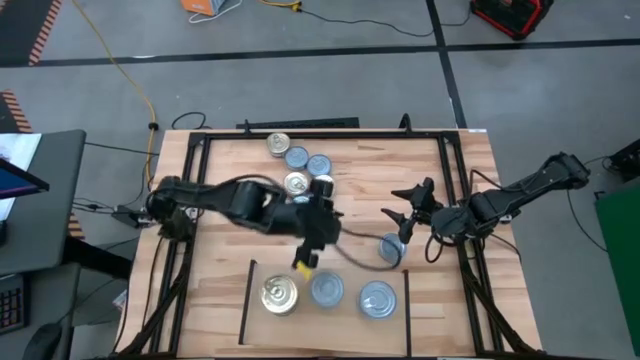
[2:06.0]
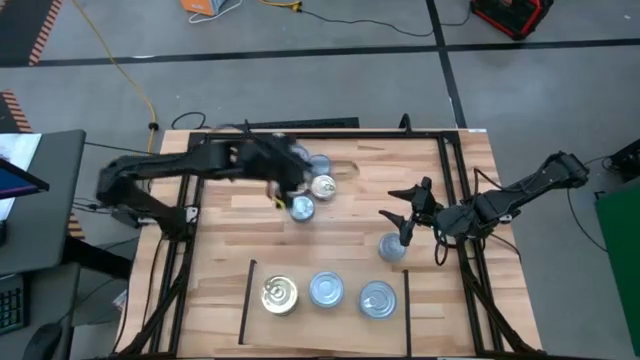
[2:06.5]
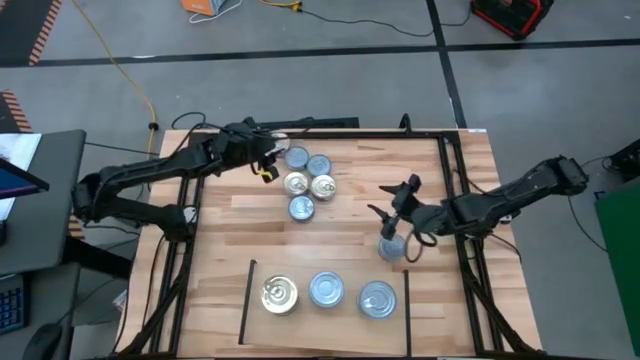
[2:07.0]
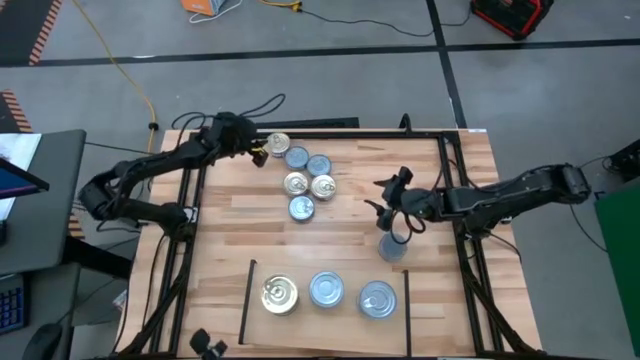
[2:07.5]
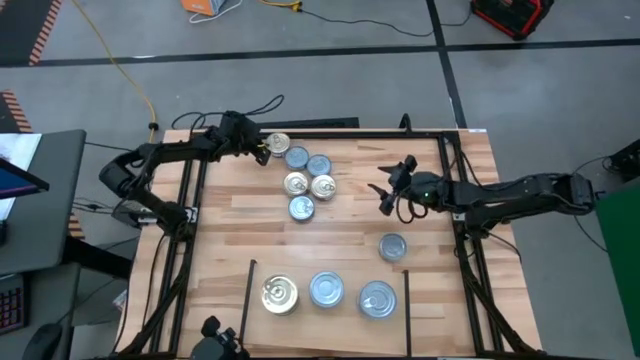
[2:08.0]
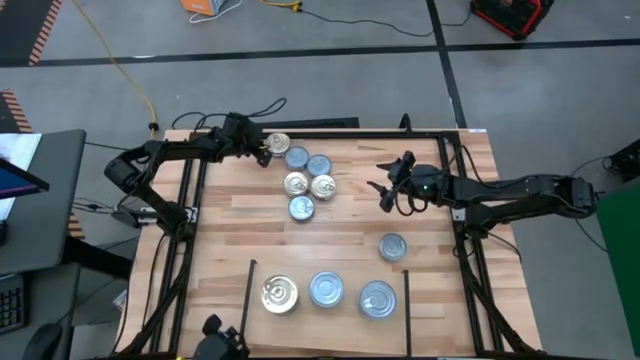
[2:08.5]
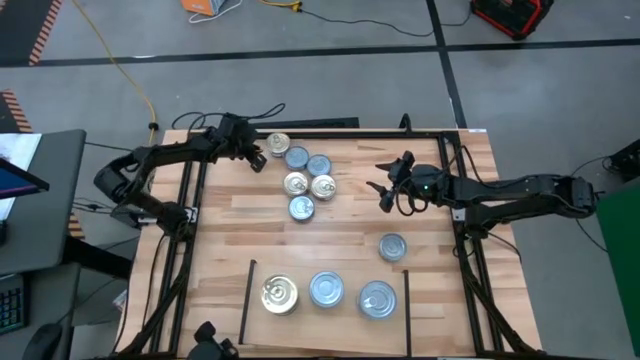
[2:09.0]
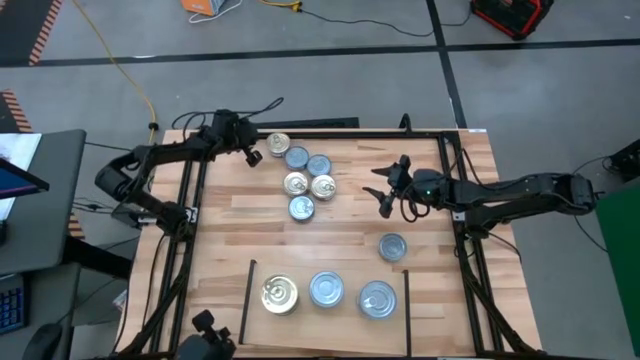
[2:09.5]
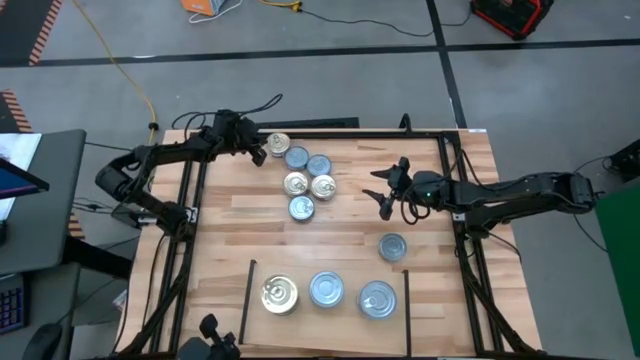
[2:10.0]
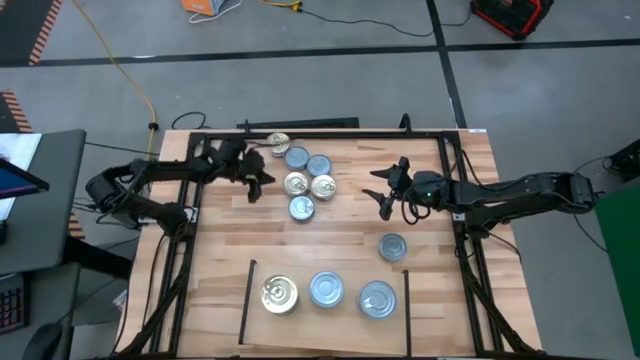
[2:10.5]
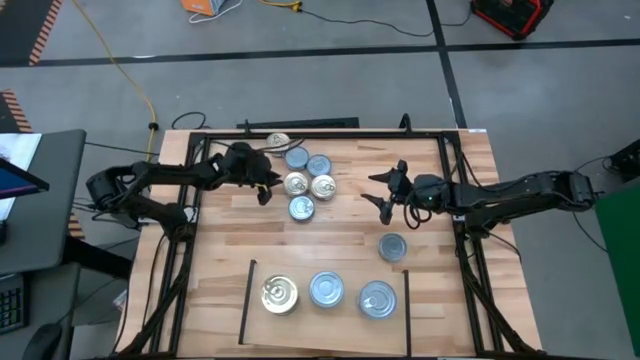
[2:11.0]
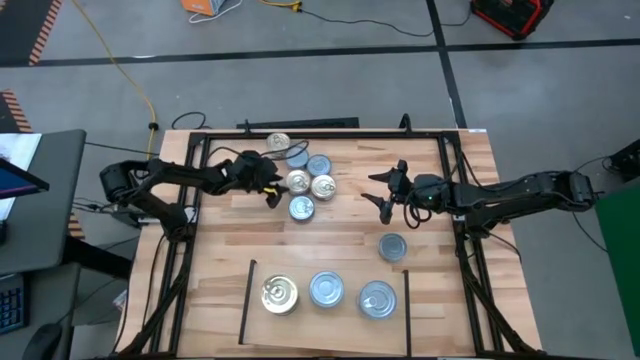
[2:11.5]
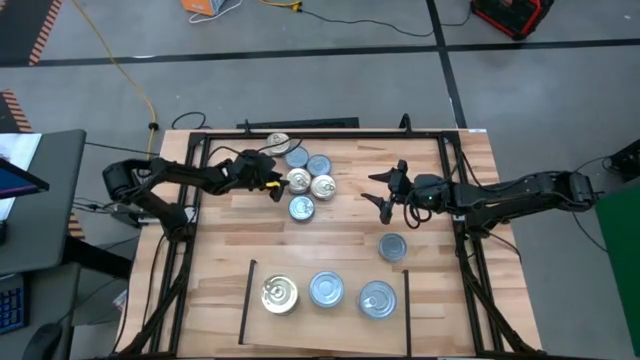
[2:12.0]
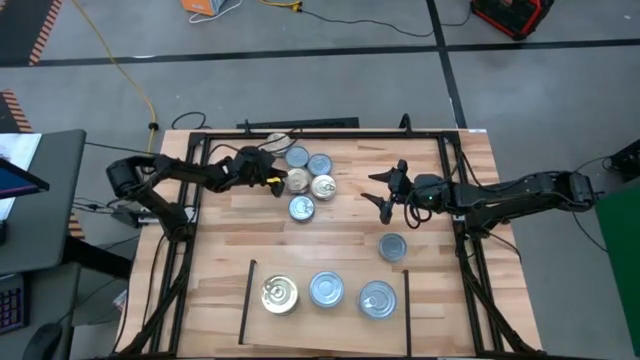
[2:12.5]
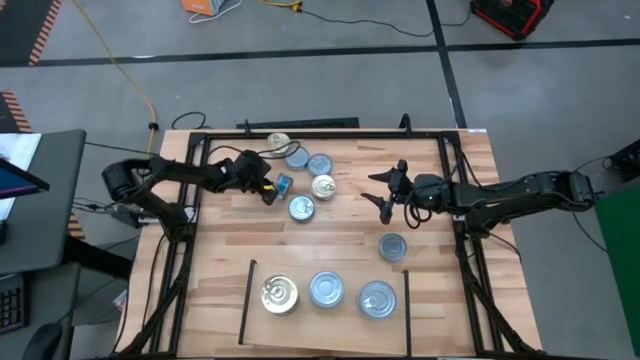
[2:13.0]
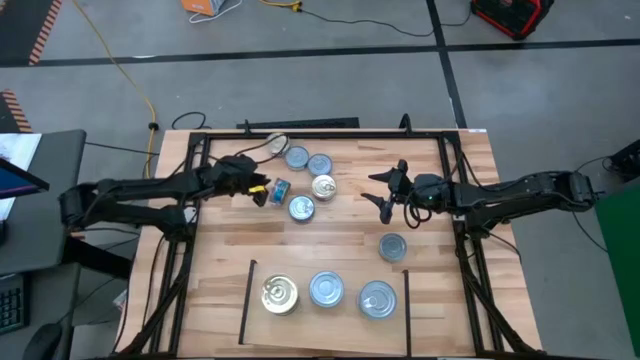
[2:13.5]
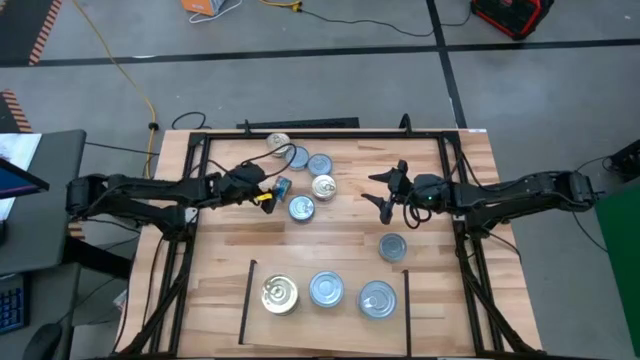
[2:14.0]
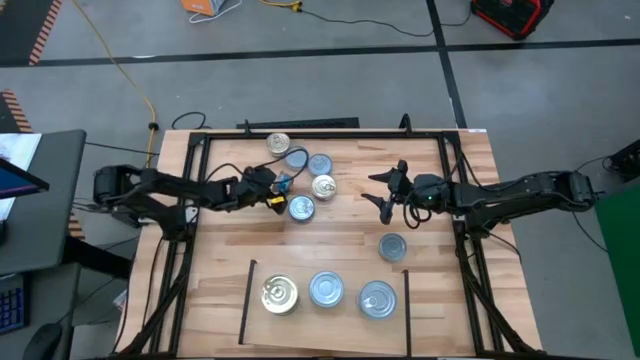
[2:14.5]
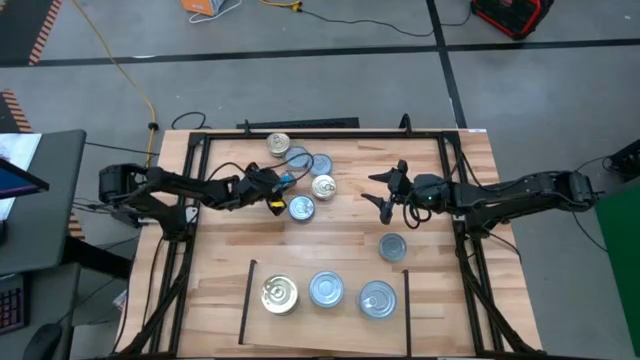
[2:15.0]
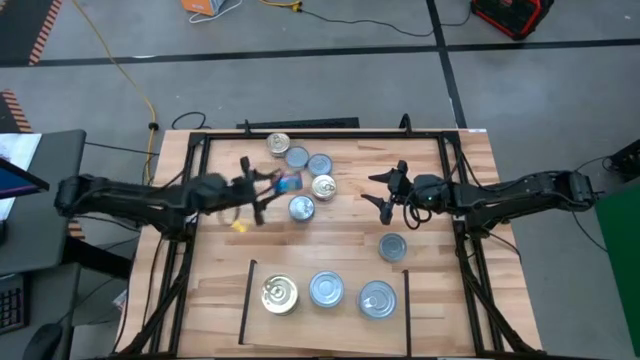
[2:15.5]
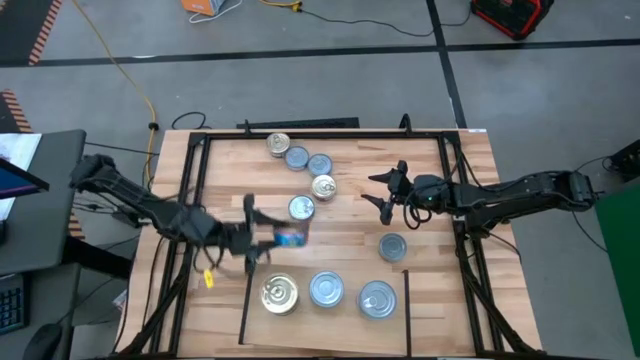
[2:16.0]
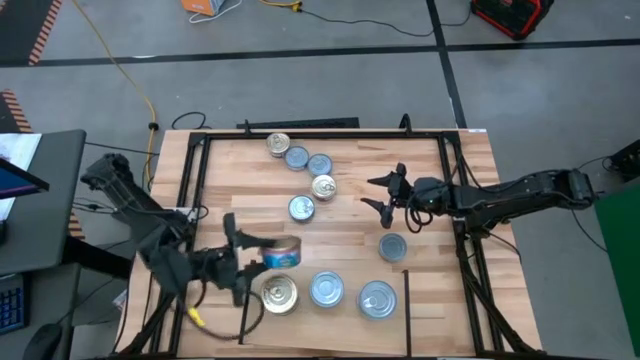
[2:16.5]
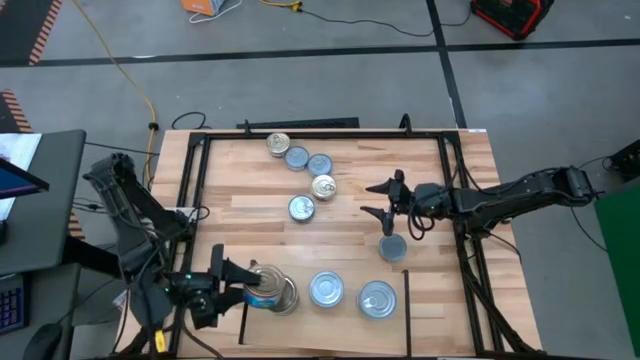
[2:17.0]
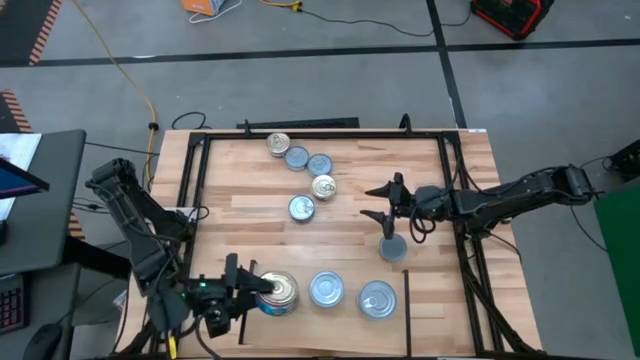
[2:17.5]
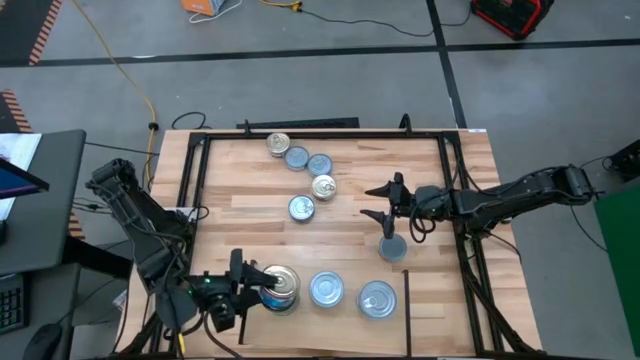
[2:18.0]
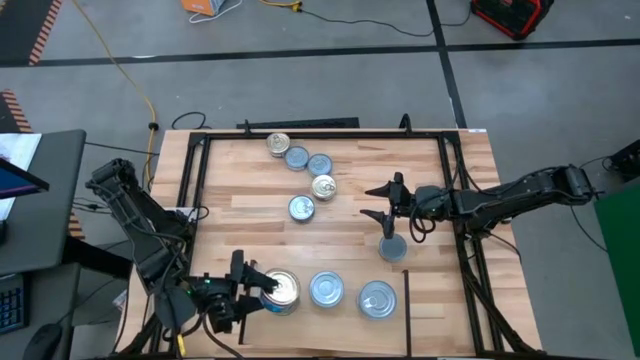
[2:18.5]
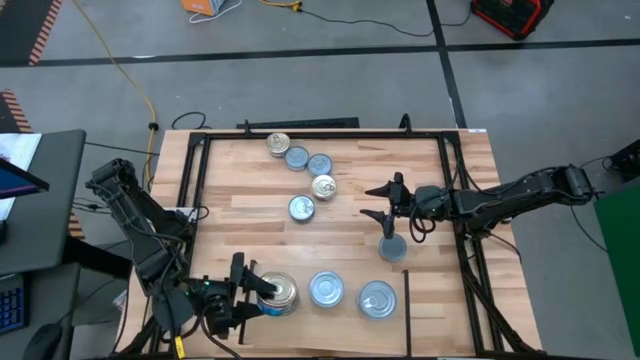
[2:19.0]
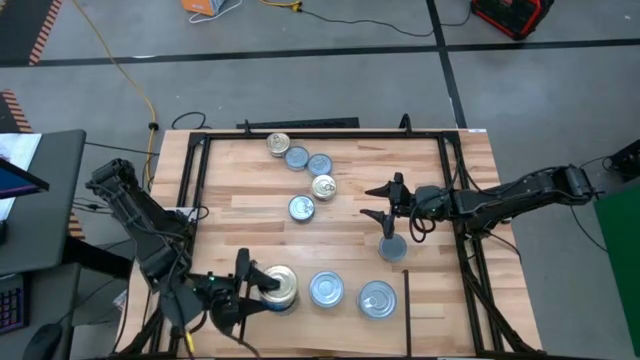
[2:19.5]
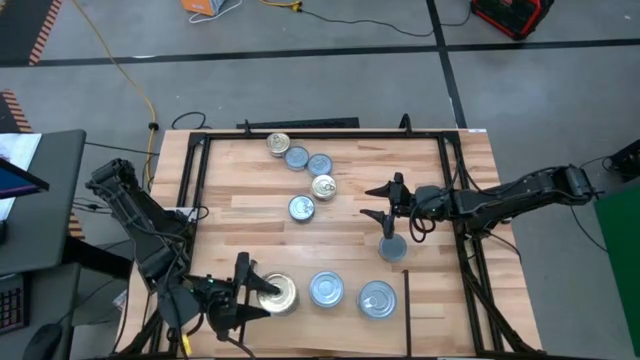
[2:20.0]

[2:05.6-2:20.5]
Task: Stack canned seafood by type on shelf
Put the bottom left blue and pink tuna can on the top of the left stacked tuna cans on the shelf

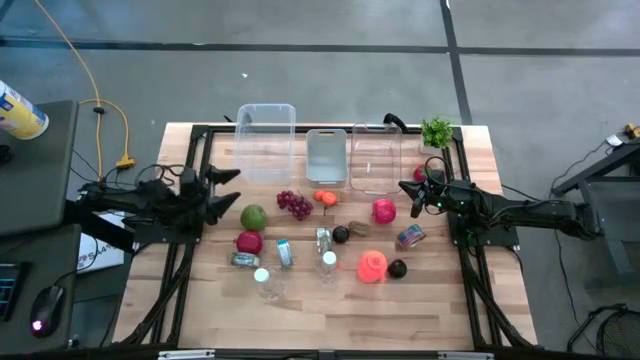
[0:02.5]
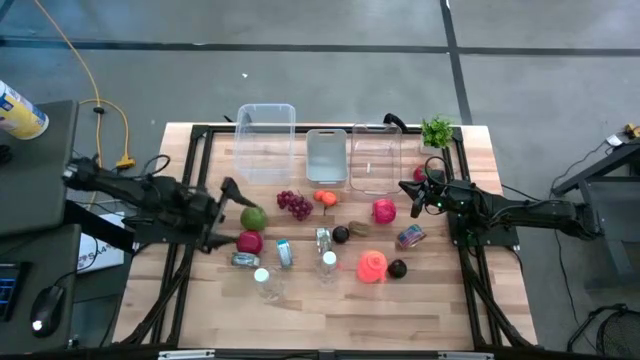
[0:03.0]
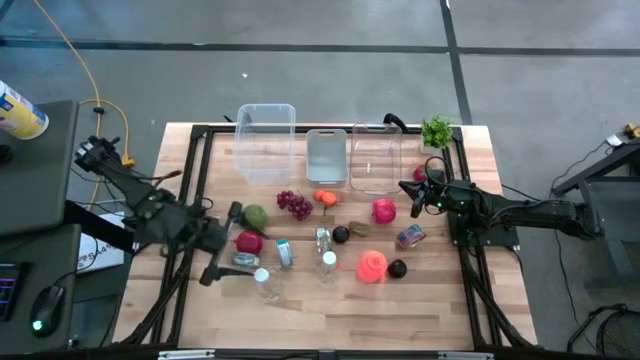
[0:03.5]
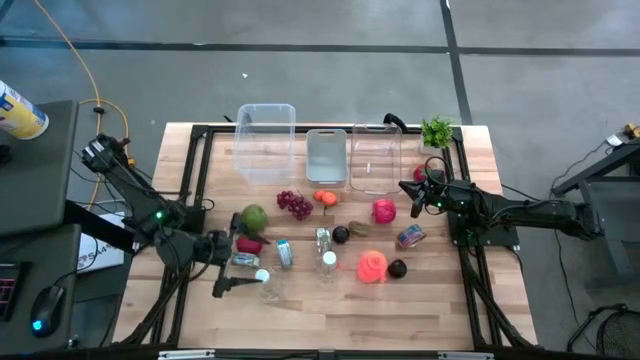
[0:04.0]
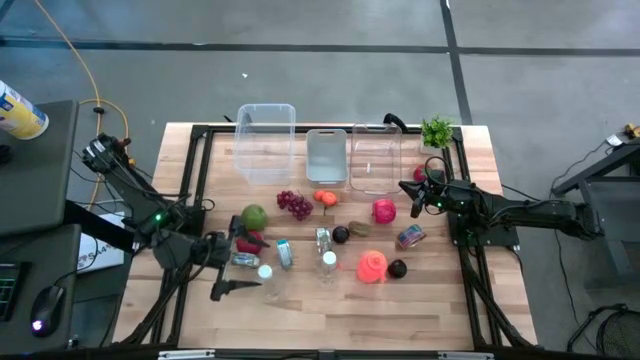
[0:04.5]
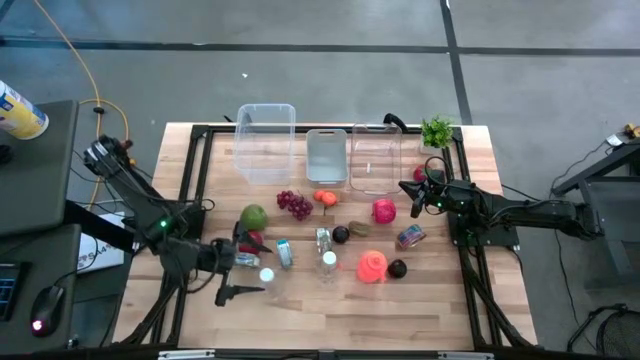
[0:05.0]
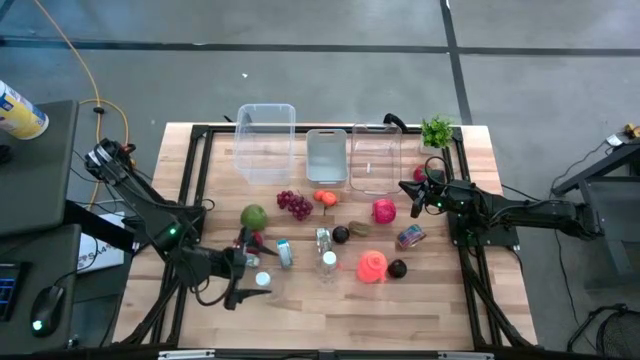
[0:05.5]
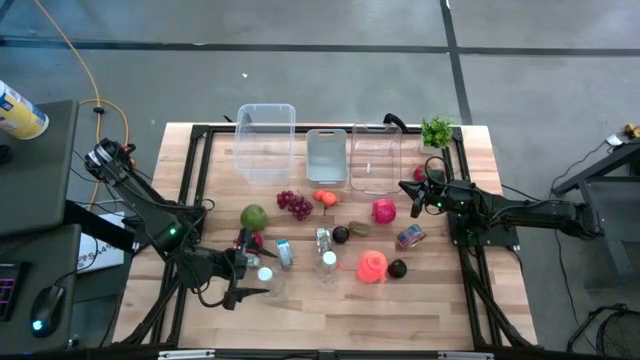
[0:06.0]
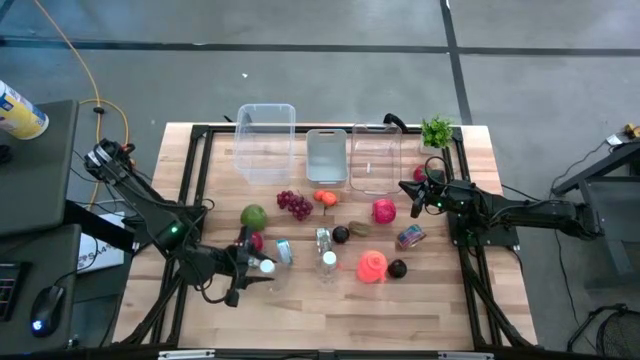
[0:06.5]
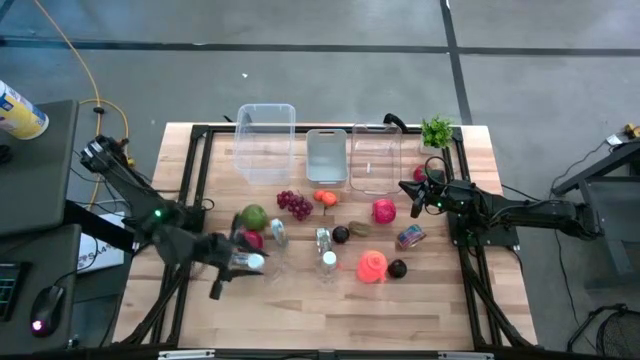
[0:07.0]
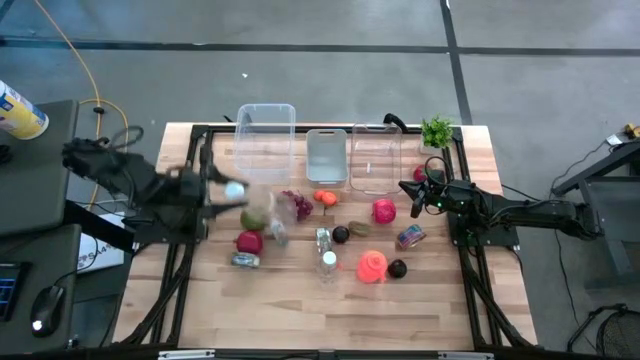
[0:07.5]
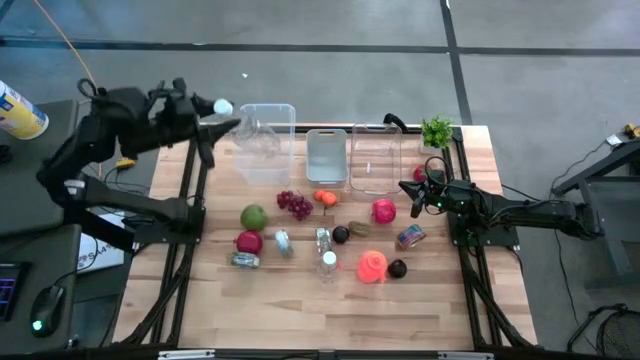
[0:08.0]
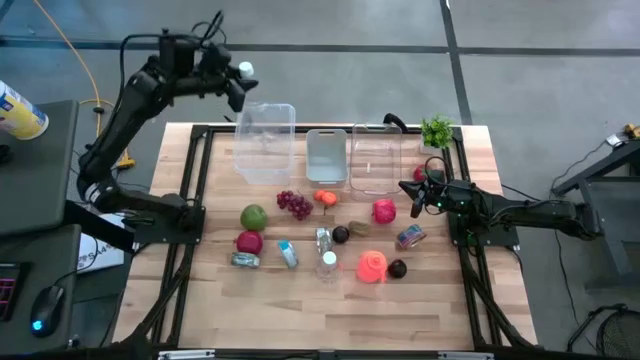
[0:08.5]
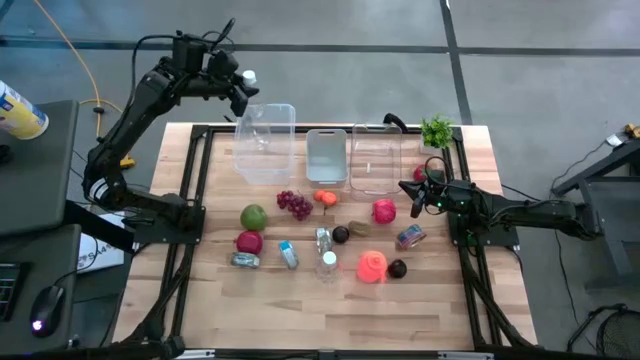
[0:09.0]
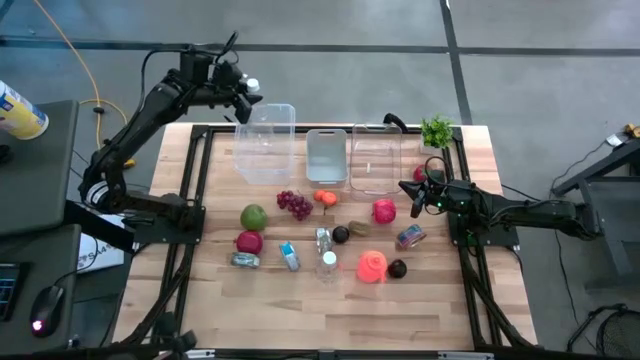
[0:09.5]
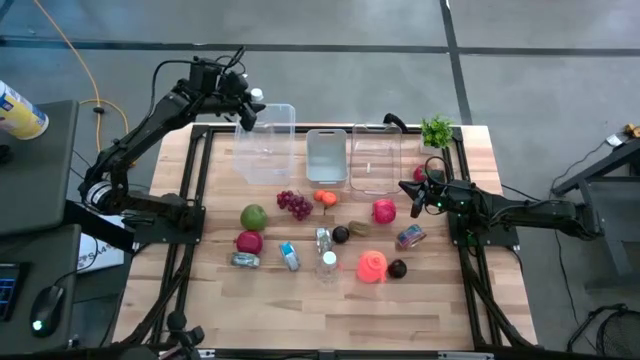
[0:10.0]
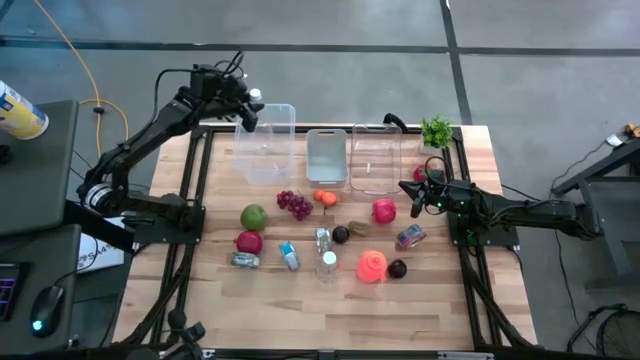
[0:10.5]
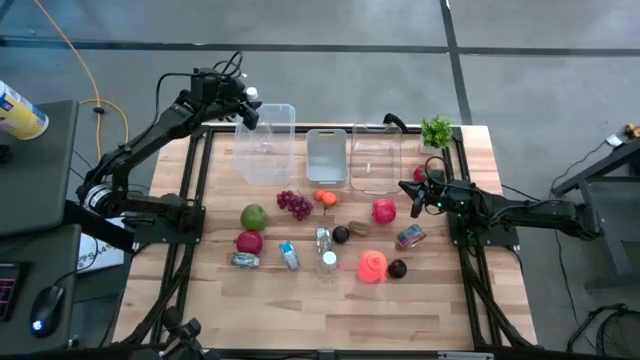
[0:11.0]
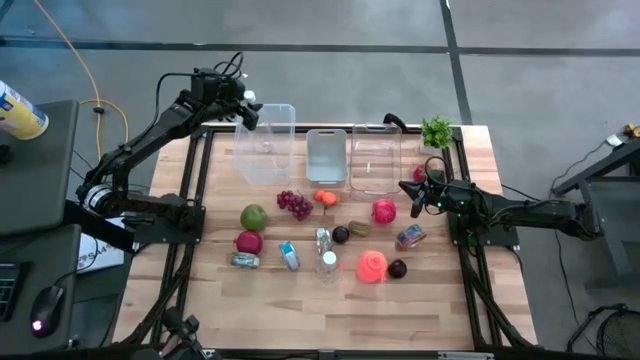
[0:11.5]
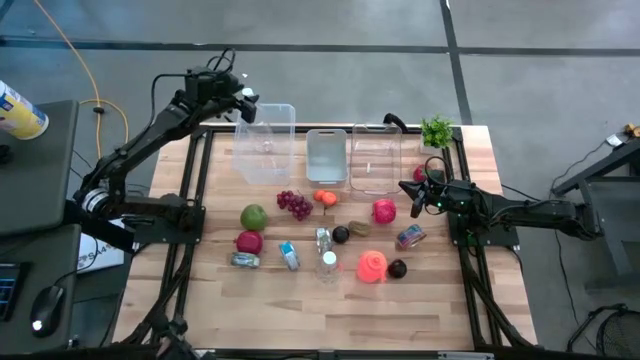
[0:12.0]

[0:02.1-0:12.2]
Task: Pick & Place Food Item
Put the white bottle into the white bin
